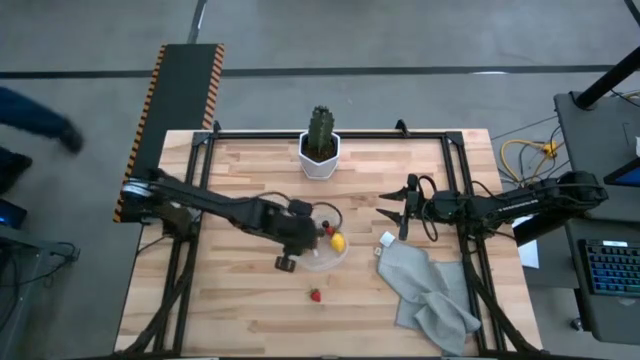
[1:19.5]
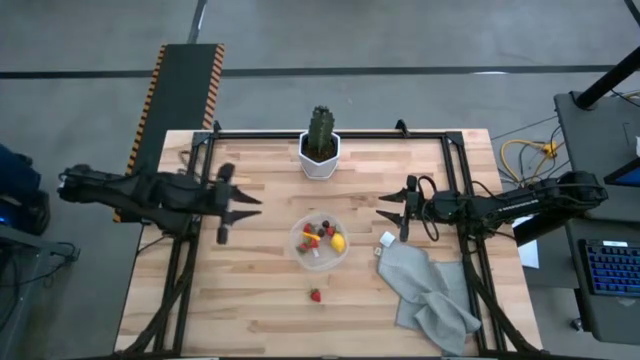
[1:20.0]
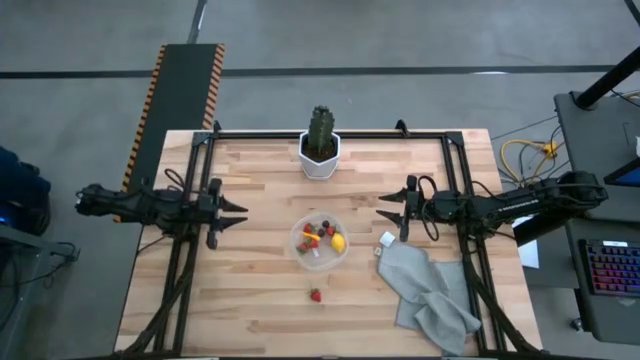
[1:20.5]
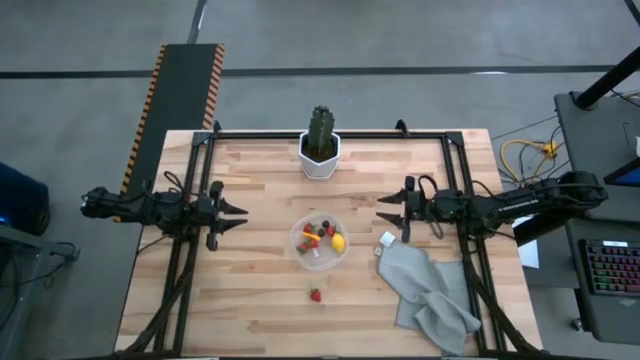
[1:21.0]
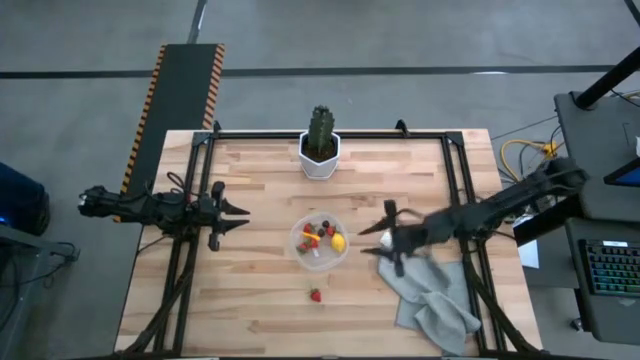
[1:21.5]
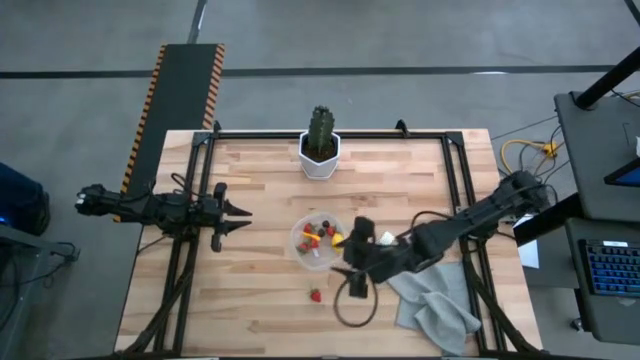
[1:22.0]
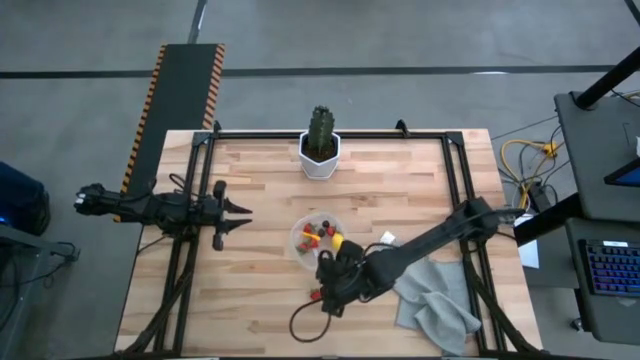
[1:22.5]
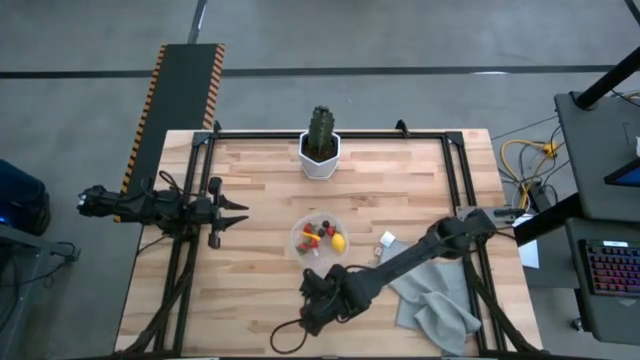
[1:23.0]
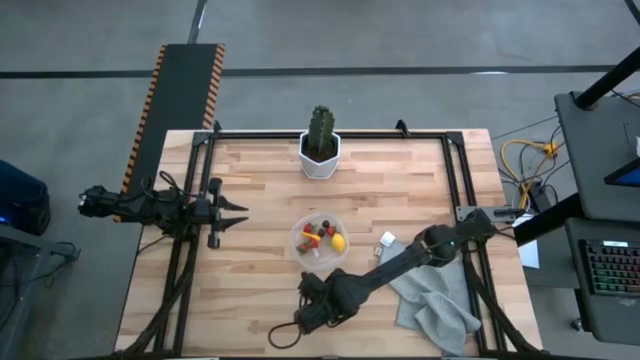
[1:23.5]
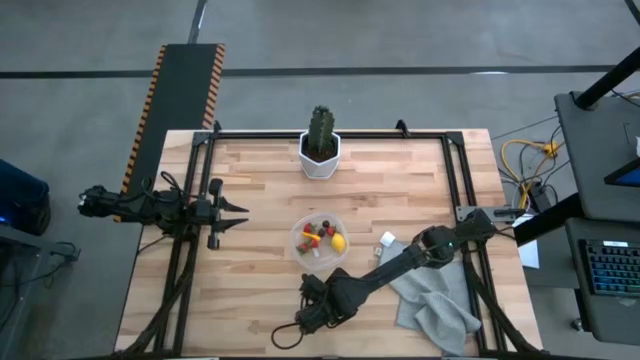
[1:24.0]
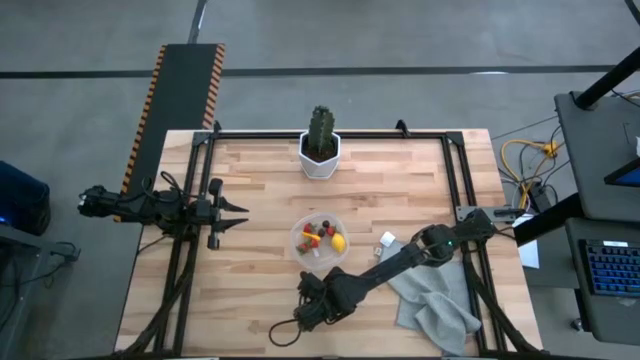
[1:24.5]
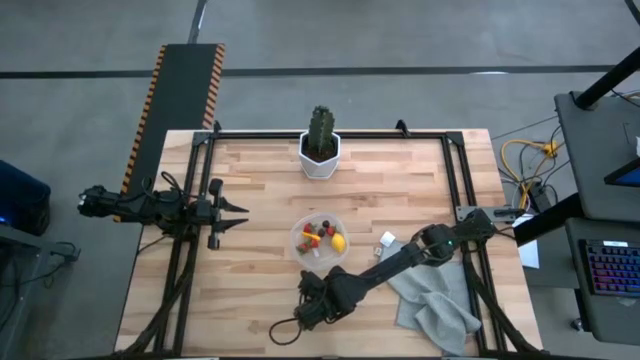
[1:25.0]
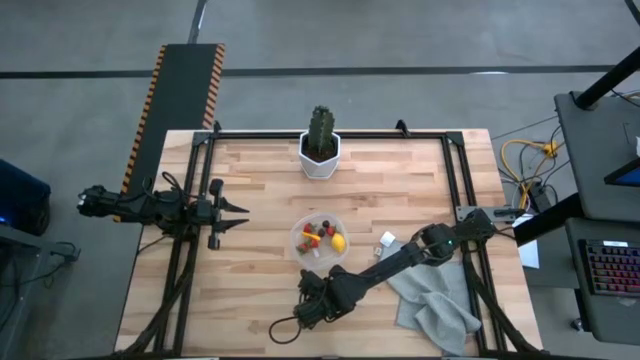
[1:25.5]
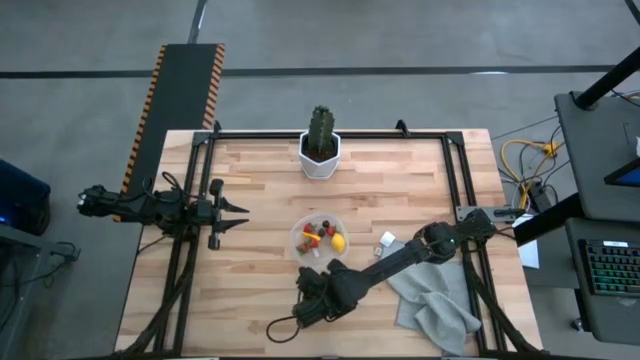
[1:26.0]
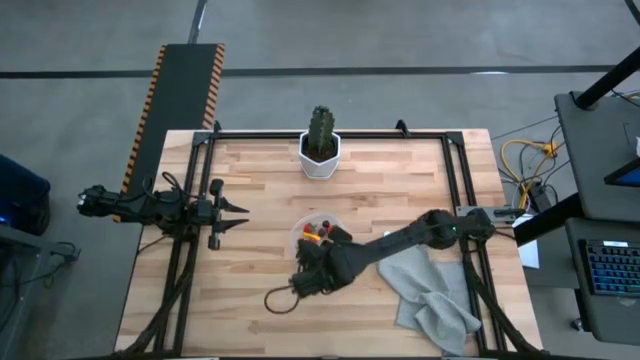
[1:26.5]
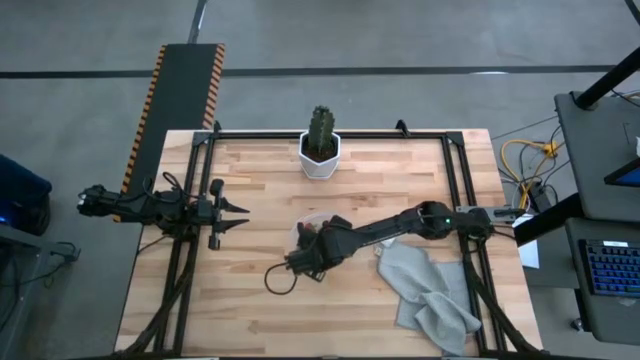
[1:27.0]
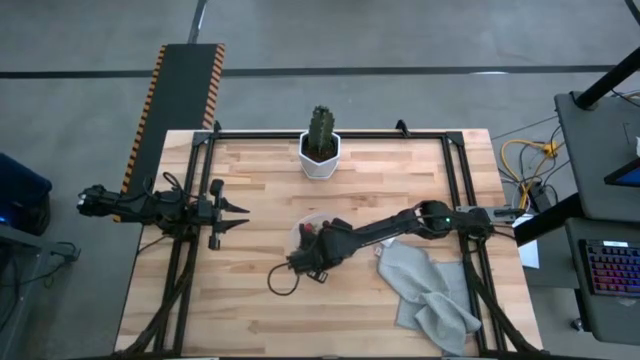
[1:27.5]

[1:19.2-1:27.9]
Task: Pick and placing Produce into tupperware
Put the red strawberry into the transparent container

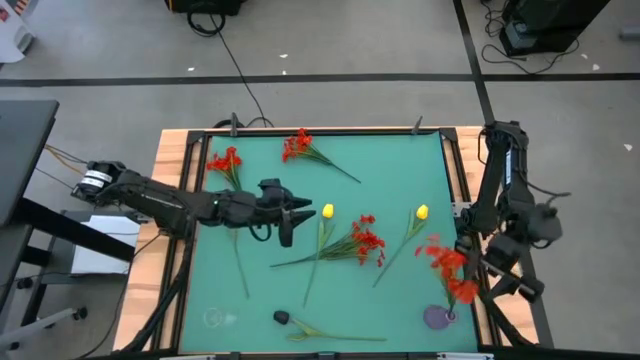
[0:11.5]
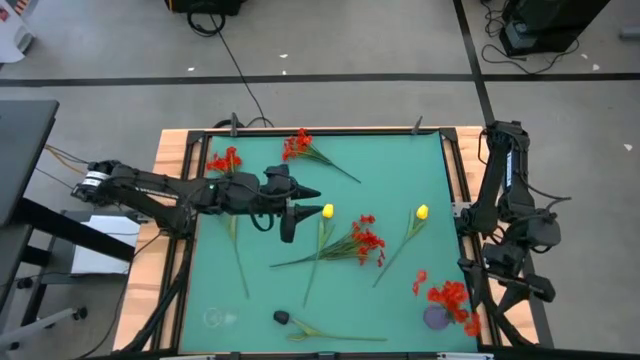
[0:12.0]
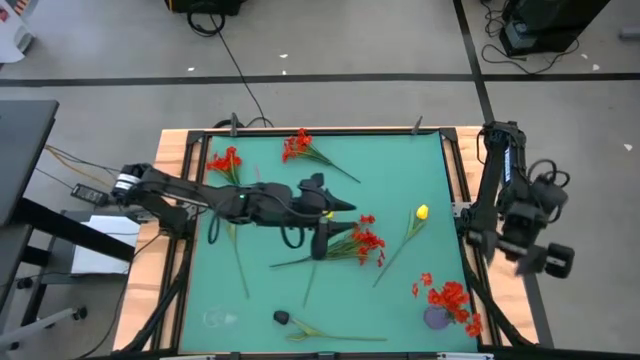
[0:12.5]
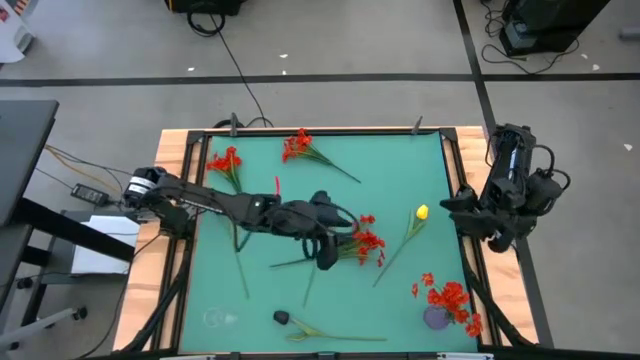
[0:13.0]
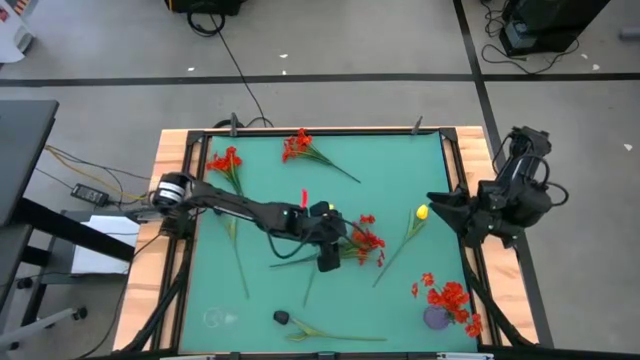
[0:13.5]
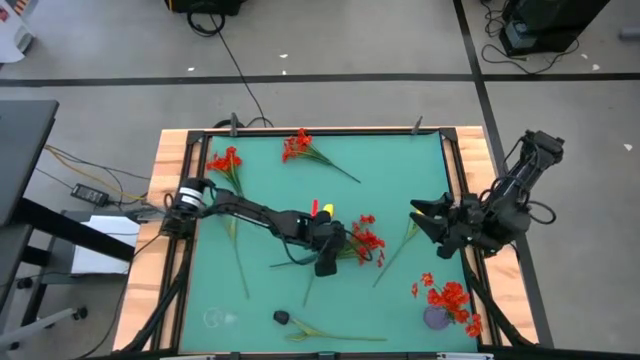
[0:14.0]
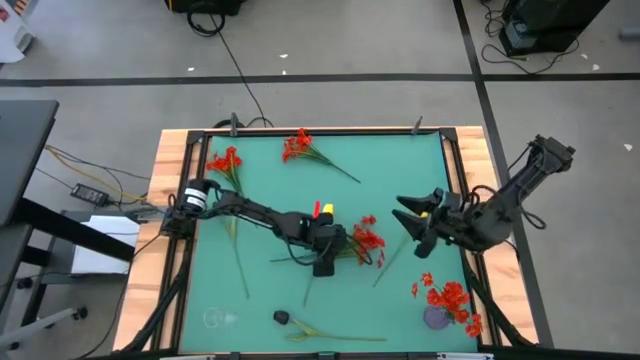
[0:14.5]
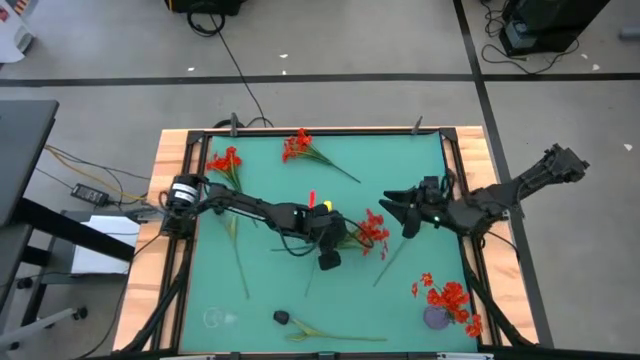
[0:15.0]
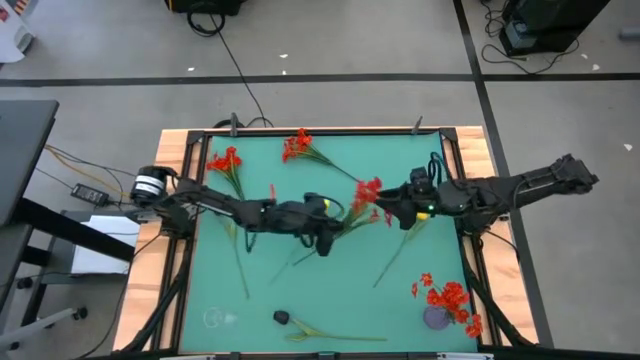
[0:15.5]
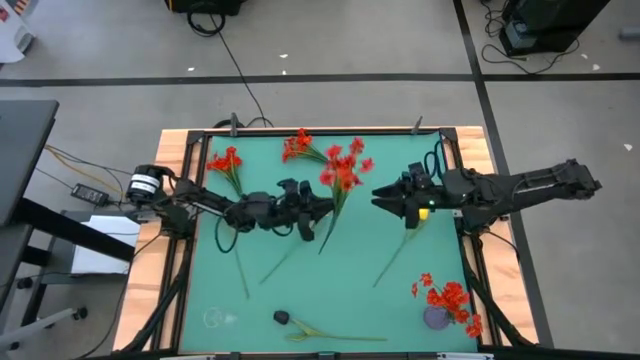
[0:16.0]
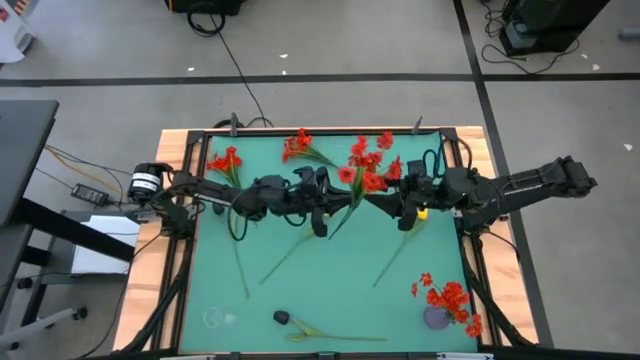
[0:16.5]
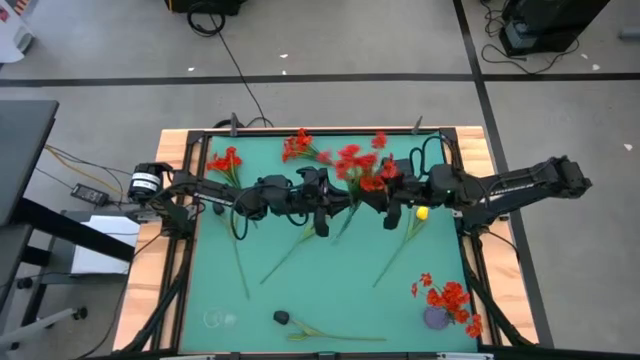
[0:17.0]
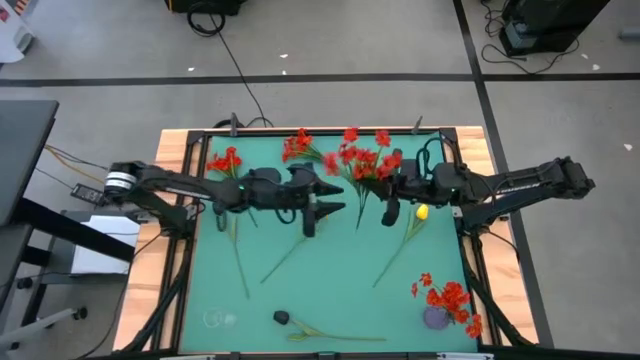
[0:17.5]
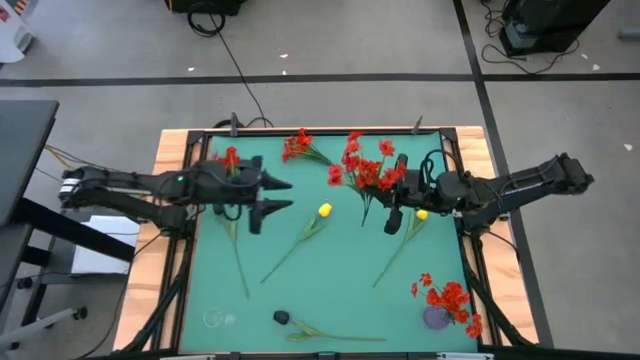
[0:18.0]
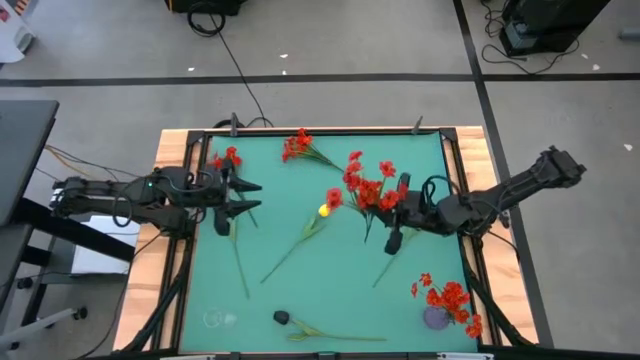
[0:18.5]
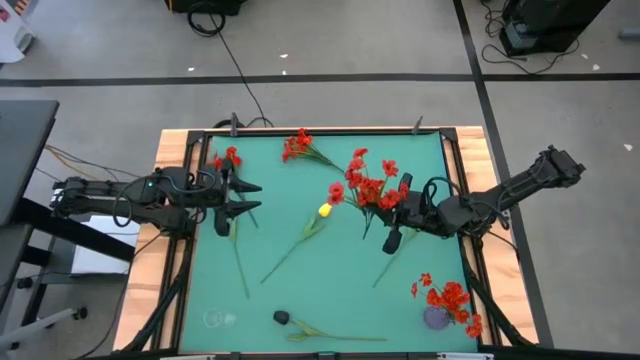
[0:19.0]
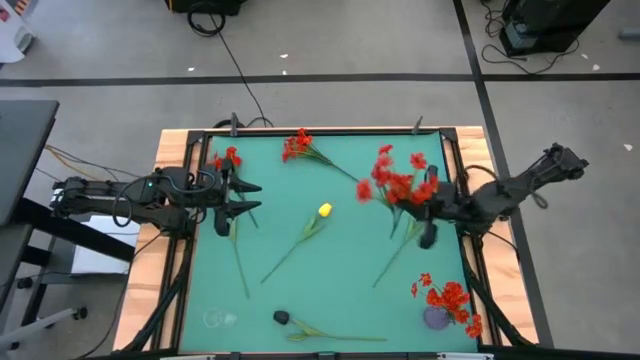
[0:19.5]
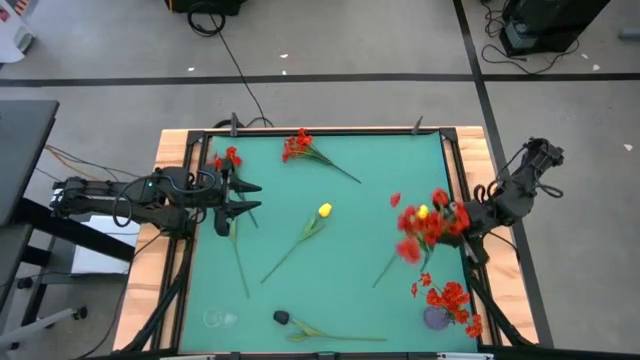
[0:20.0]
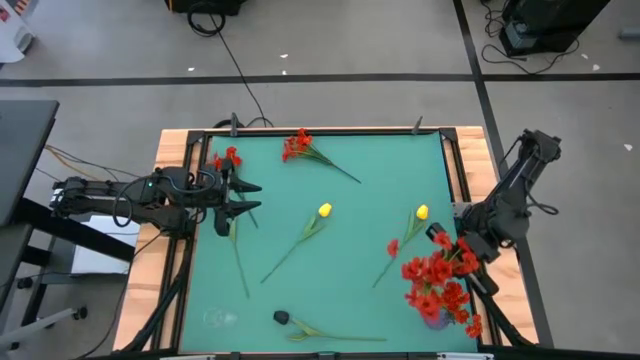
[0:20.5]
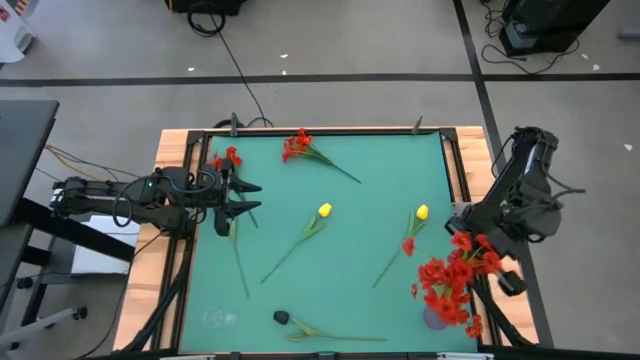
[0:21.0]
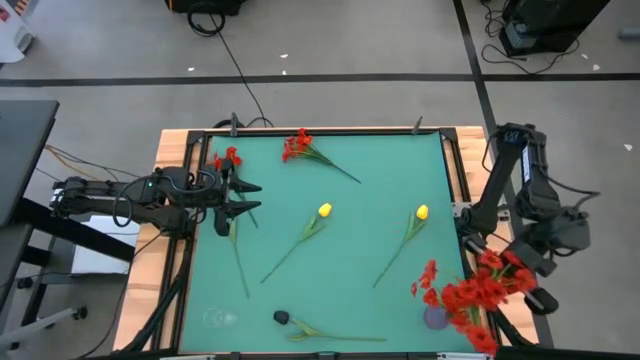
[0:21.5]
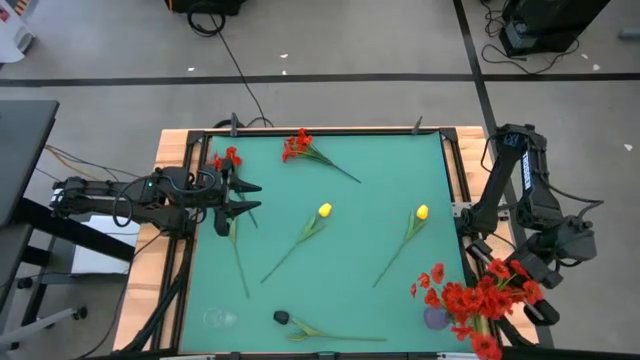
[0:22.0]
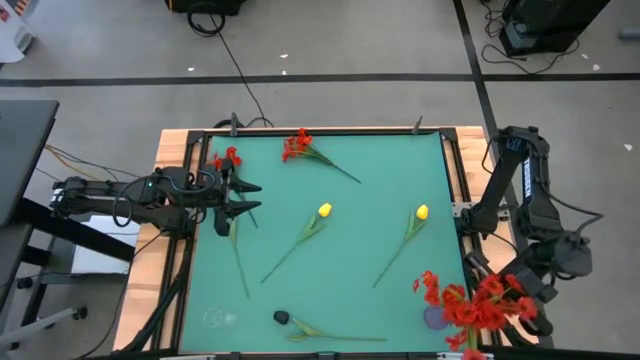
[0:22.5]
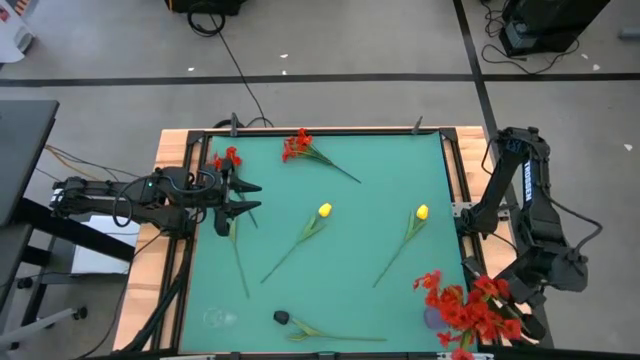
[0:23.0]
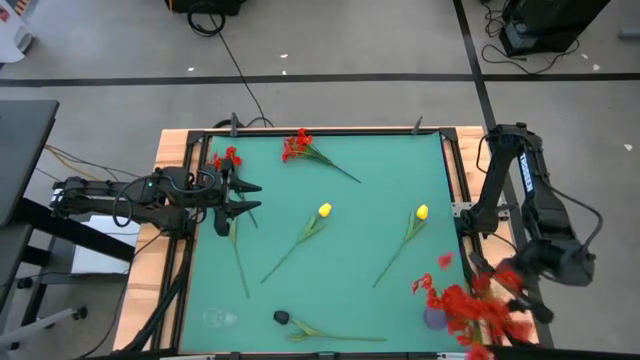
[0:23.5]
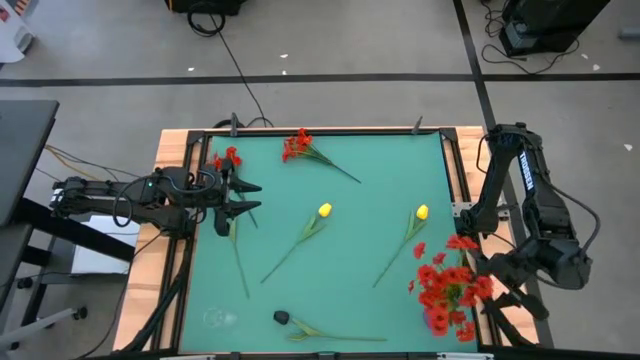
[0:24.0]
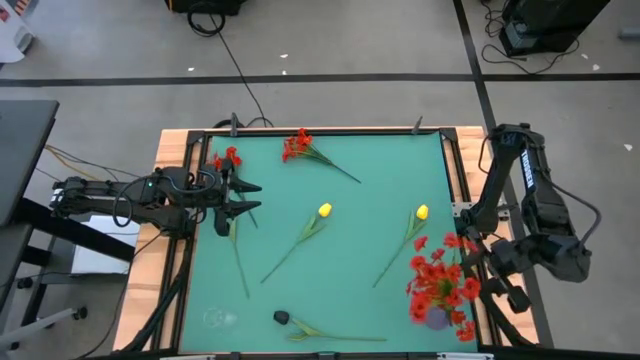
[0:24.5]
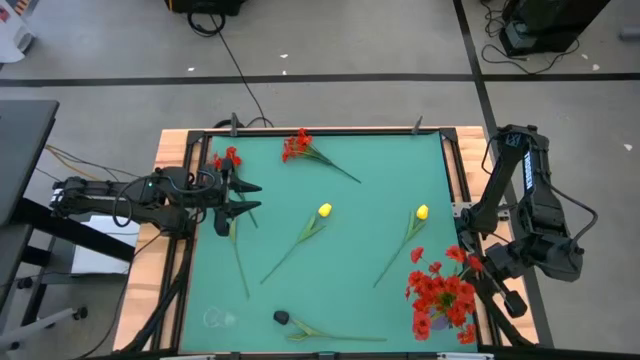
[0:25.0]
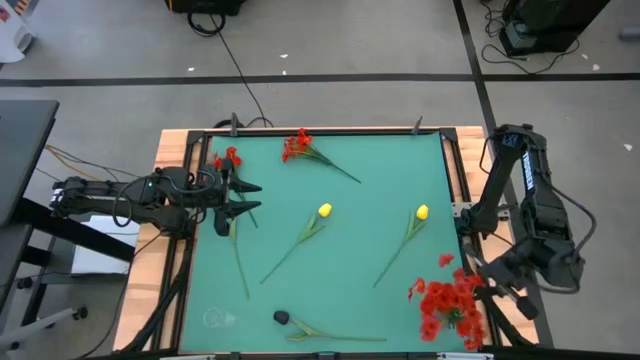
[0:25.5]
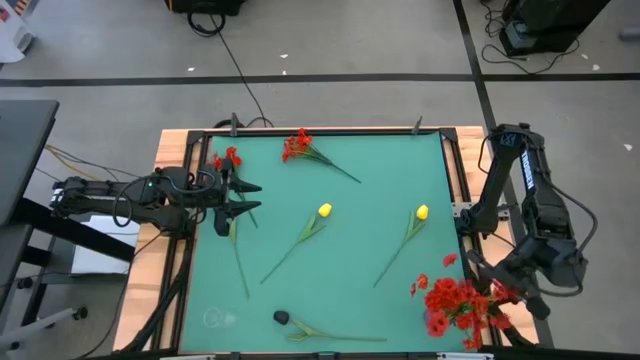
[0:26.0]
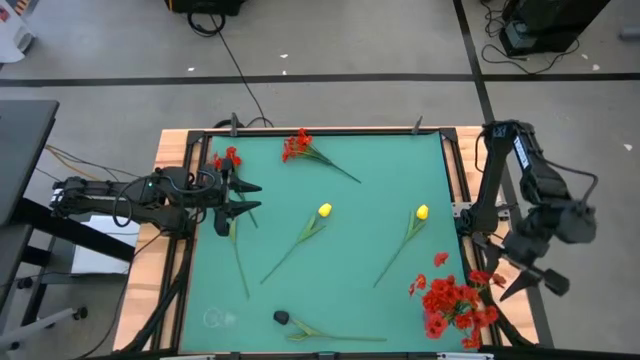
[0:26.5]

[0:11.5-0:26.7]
Task: Sort flowers into vase by color
Put the bottom orange flowers into the violet vase
